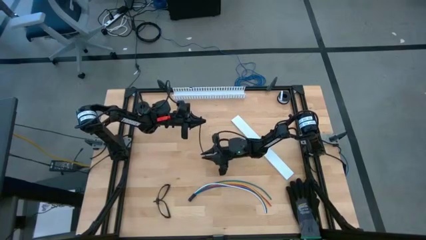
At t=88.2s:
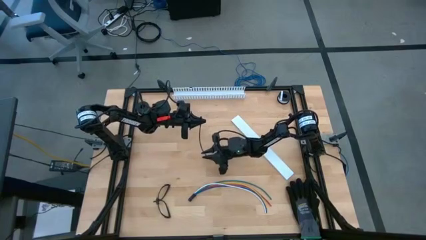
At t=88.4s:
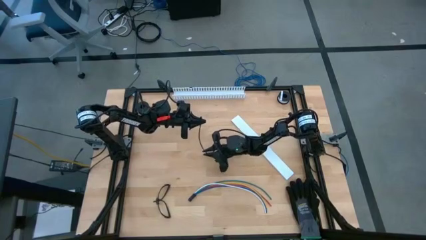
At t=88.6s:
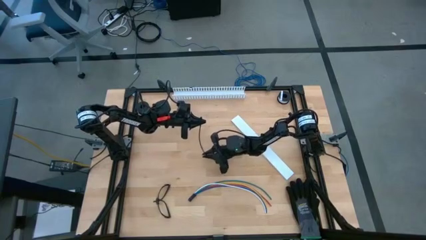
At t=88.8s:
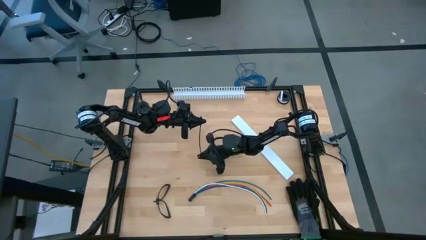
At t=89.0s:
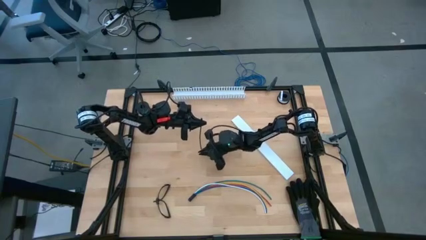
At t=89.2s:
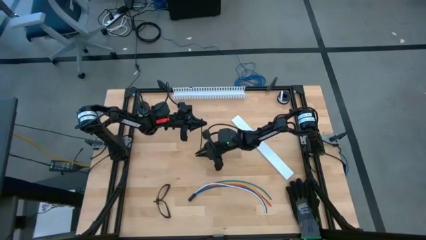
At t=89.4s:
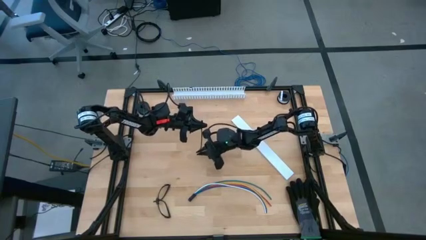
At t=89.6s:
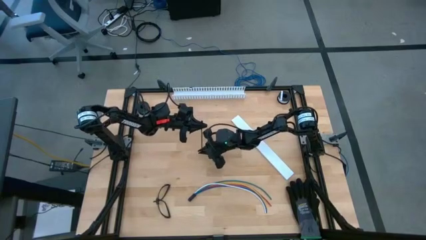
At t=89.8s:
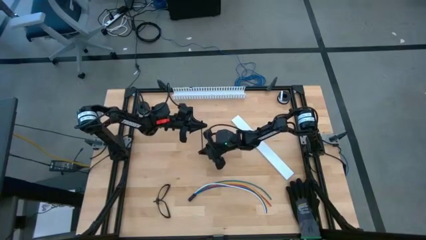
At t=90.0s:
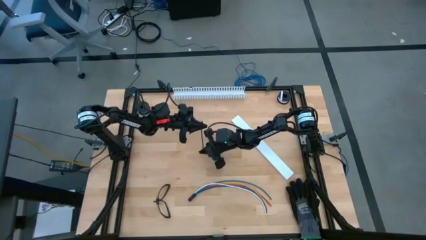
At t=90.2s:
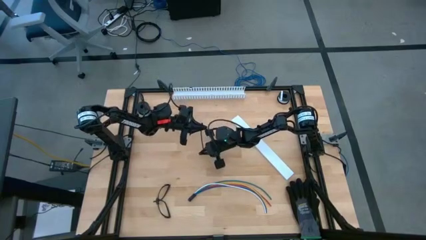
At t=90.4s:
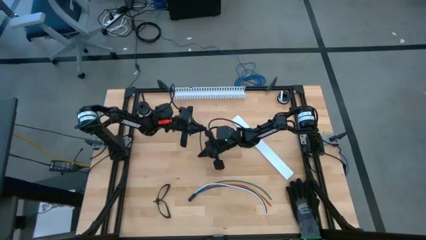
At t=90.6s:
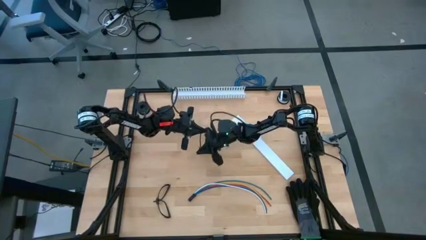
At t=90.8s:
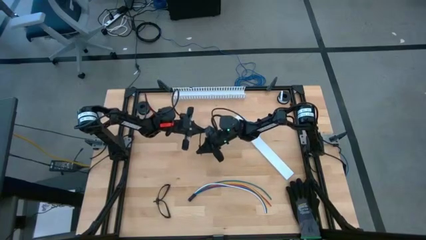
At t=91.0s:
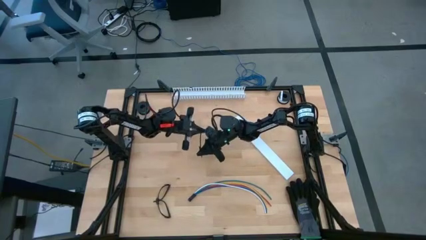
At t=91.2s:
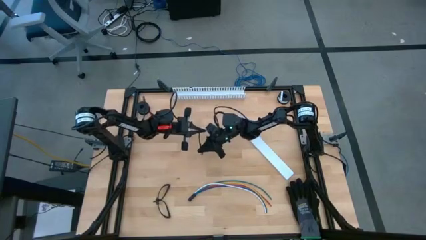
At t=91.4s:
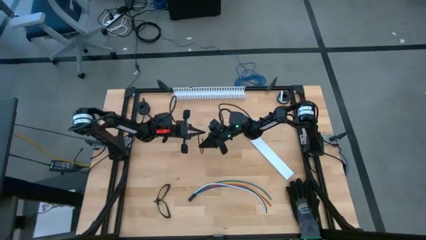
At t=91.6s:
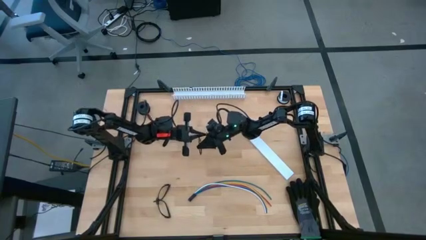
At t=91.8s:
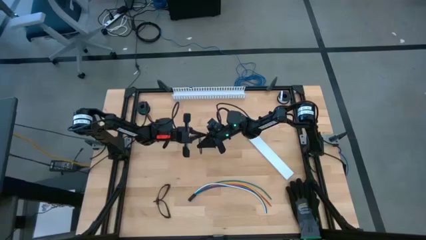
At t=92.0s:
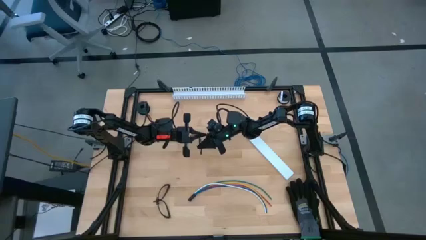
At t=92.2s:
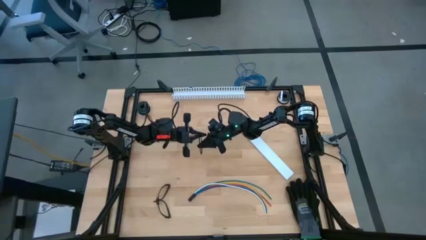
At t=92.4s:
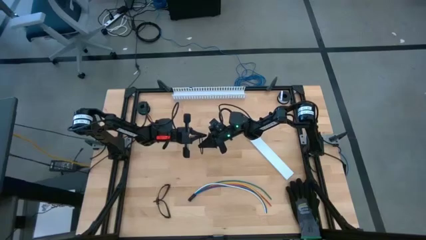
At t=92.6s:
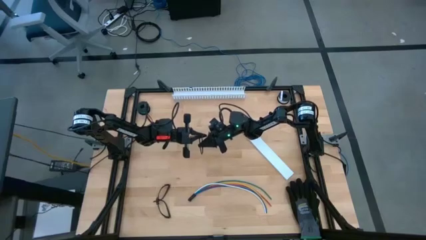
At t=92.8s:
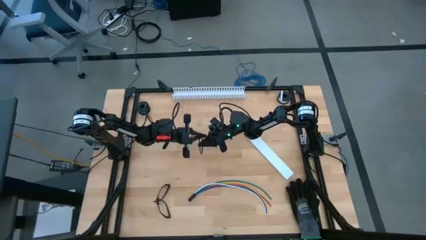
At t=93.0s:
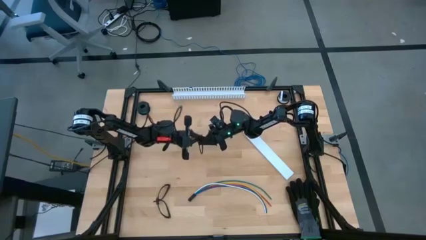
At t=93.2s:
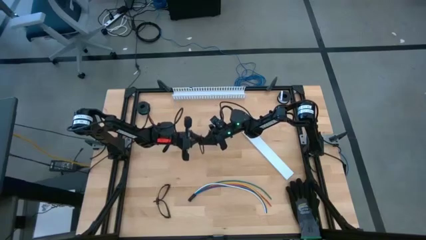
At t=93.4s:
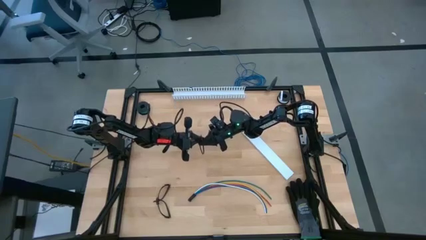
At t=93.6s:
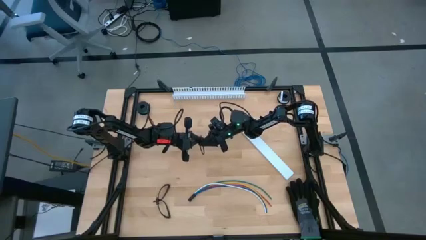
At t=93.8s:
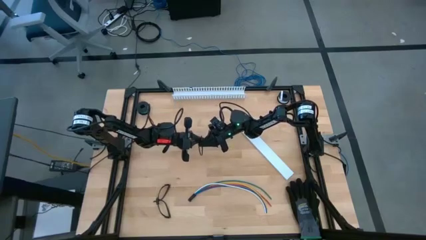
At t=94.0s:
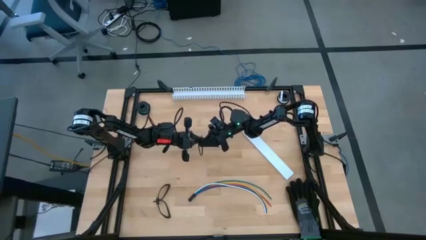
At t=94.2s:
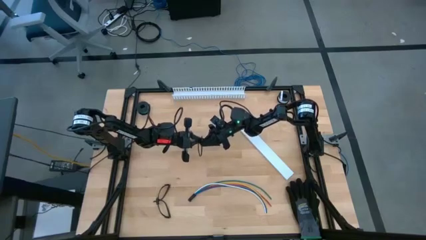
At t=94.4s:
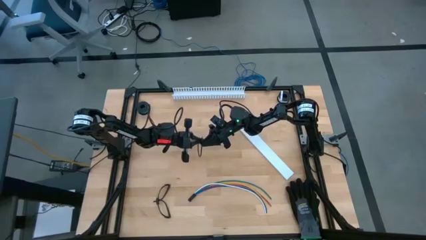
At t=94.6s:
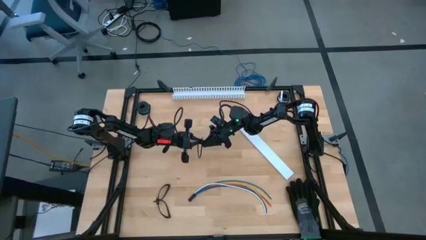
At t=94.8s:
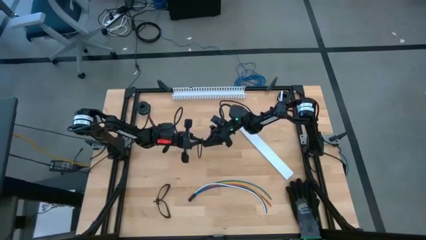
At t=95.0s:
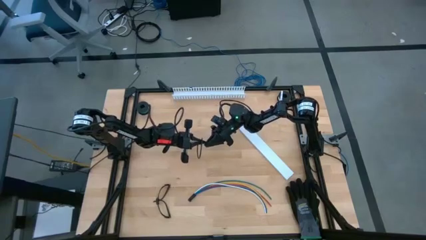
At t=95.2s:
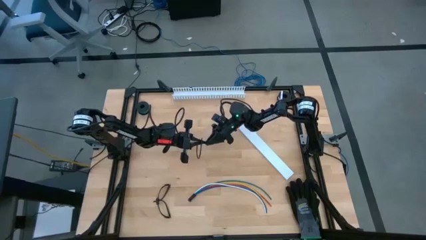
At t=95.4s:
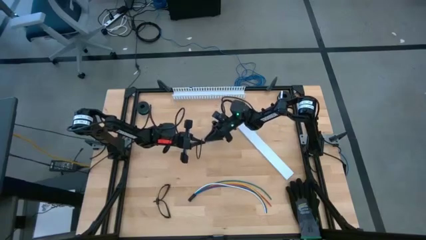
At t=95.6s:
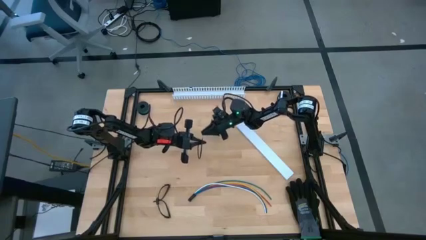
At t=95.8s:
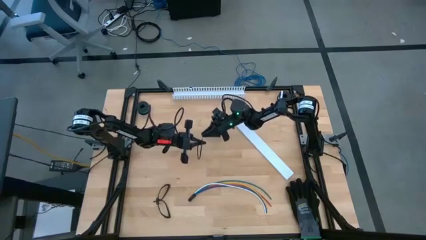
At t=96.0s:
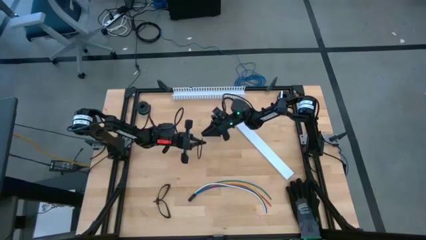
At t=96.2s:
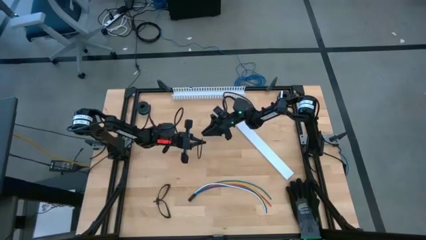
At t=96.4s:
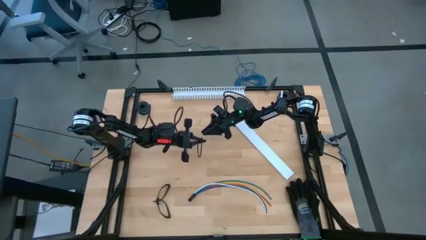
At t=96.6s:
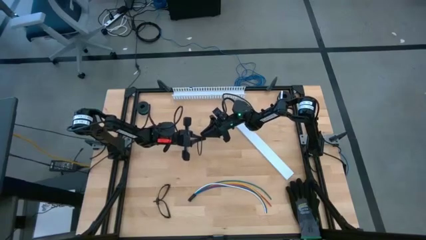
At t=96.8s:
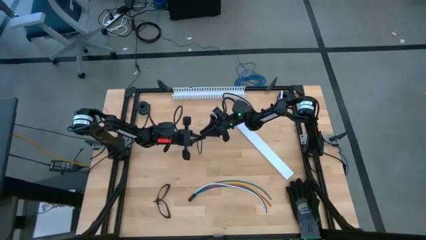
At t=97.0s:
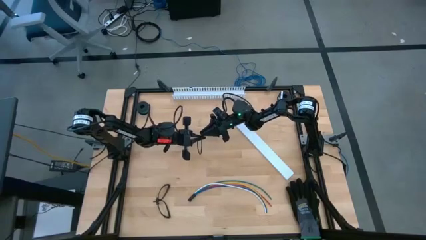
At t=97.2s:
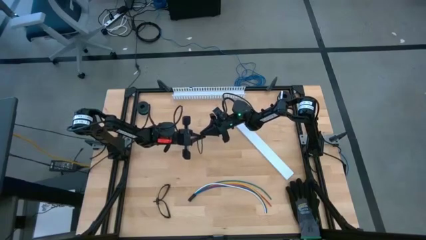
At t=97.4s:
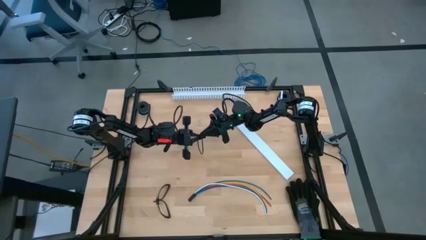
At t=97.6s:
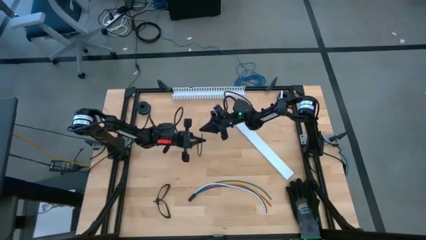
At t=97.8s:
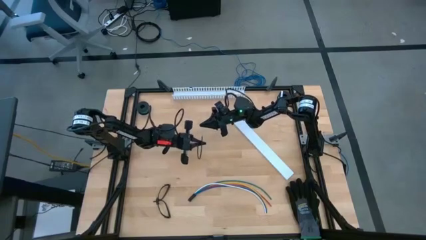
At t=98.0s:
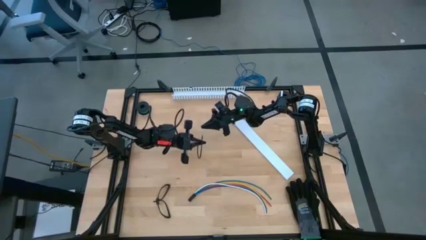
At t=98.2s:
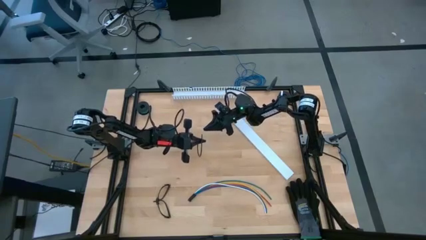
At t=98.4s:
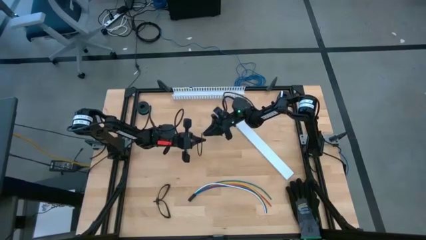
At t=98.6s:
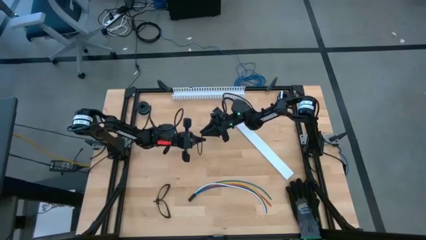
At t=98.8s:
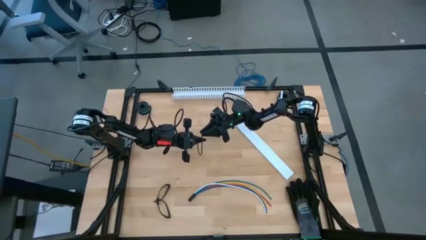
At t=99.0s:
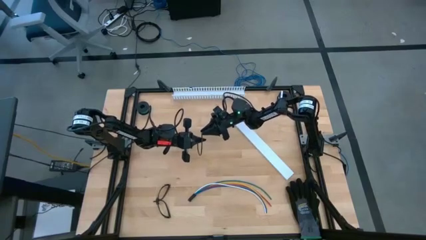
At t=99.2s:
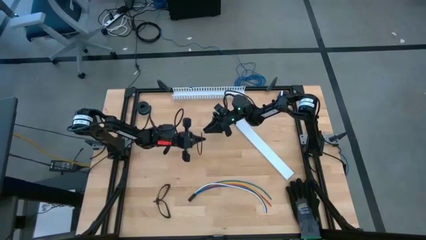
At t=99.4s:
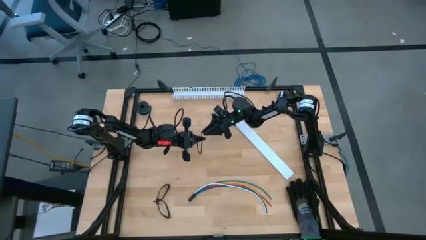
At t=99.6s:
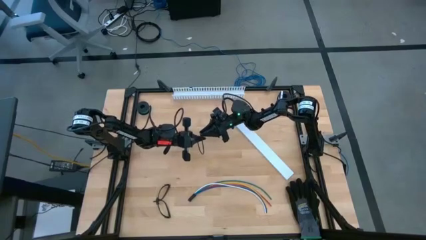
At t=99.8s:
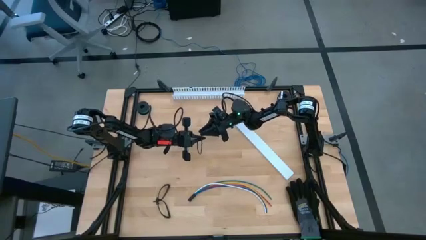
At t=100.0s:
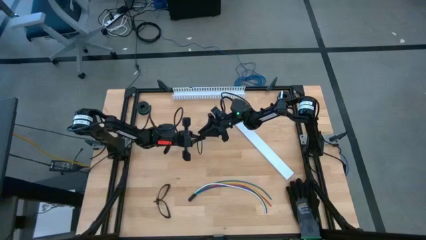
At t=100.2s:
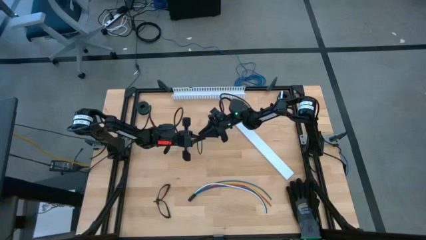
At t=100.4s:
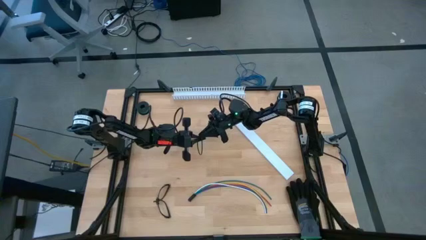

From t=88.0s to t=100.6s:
Task: Ziptie cables
Wrap the zip tie around the cable wires
